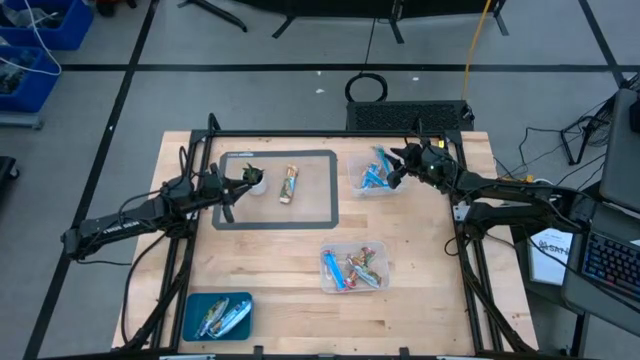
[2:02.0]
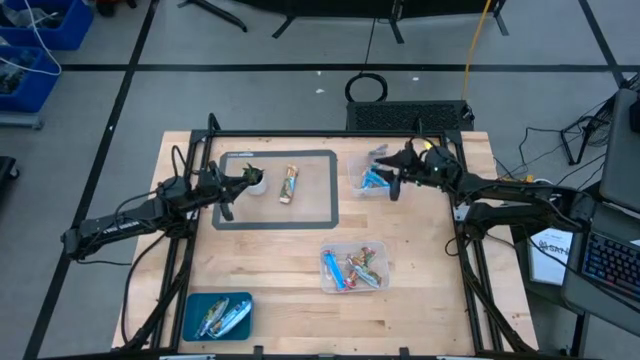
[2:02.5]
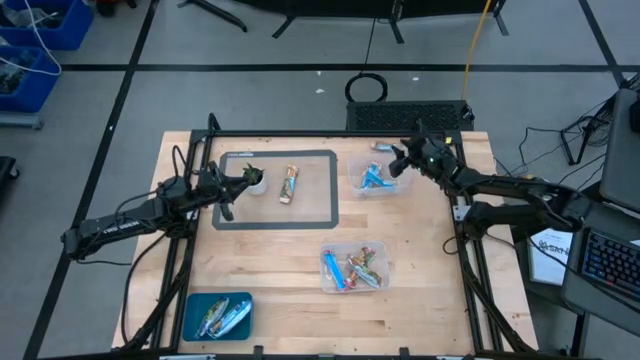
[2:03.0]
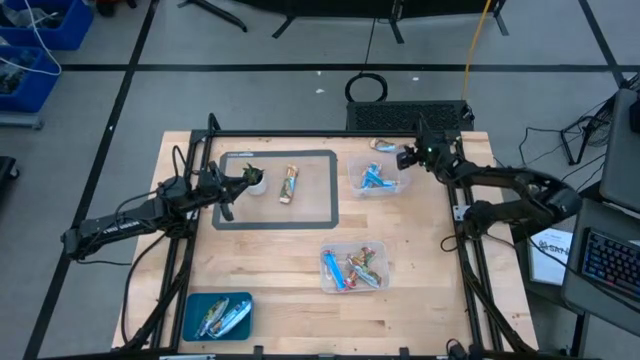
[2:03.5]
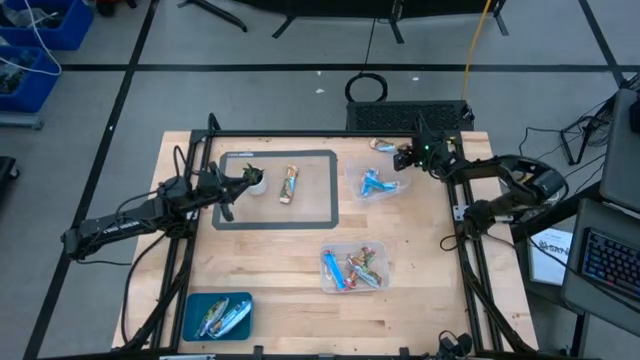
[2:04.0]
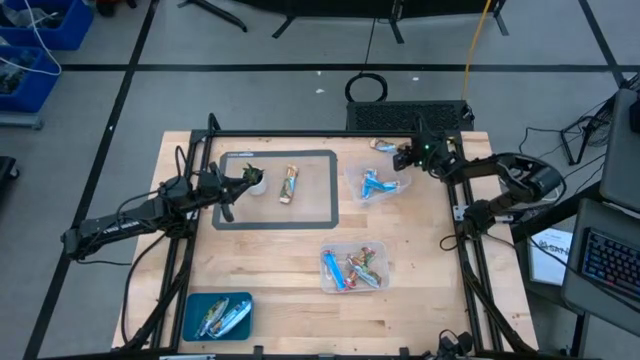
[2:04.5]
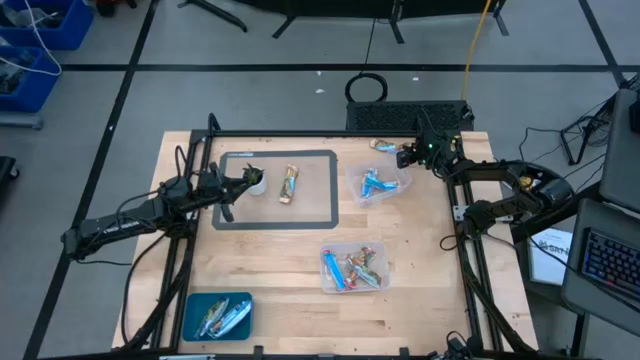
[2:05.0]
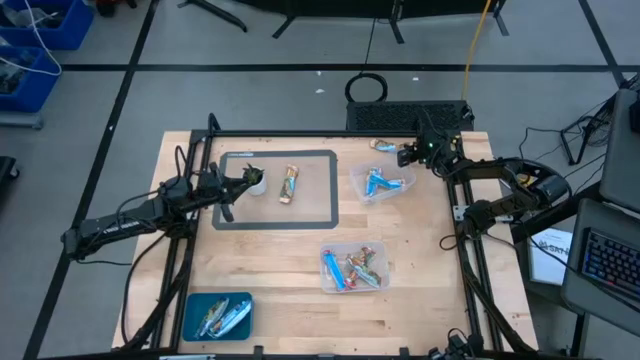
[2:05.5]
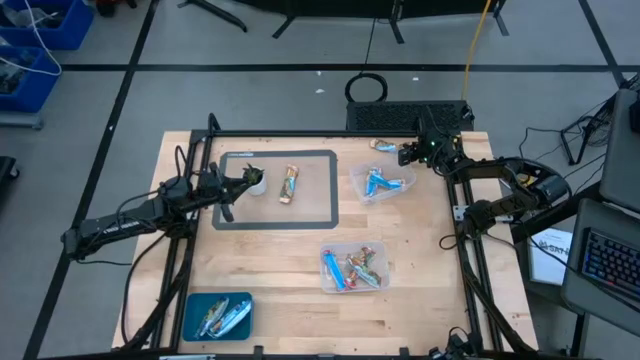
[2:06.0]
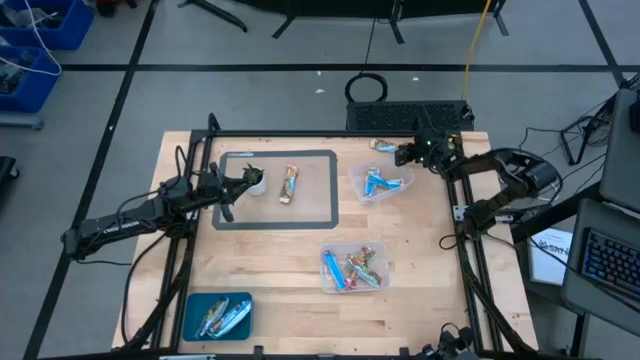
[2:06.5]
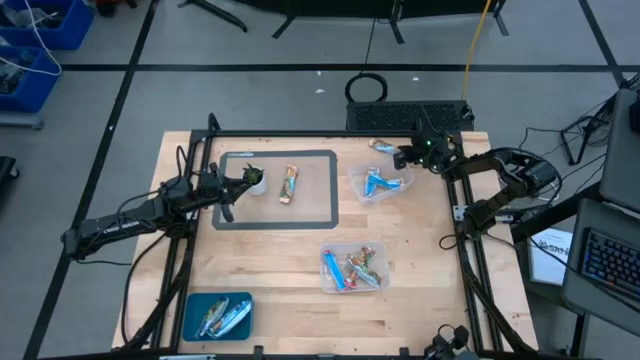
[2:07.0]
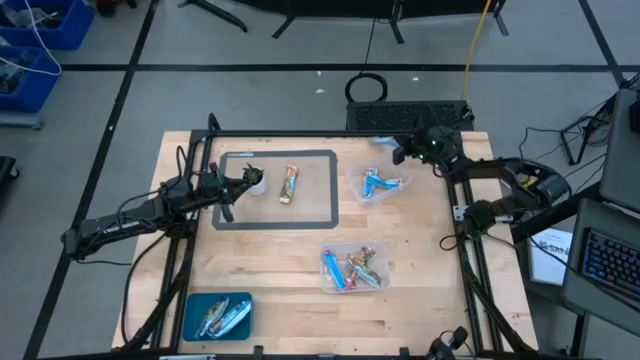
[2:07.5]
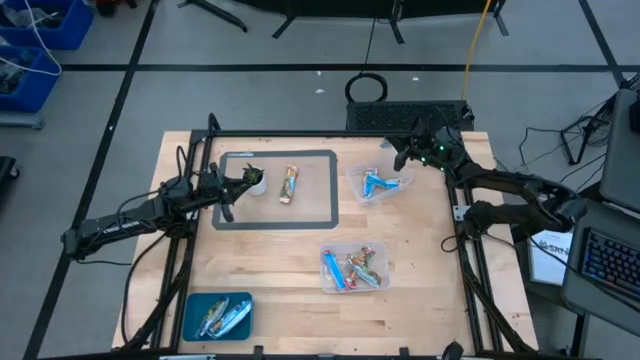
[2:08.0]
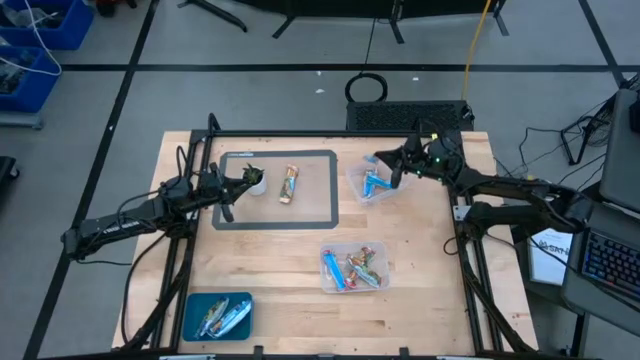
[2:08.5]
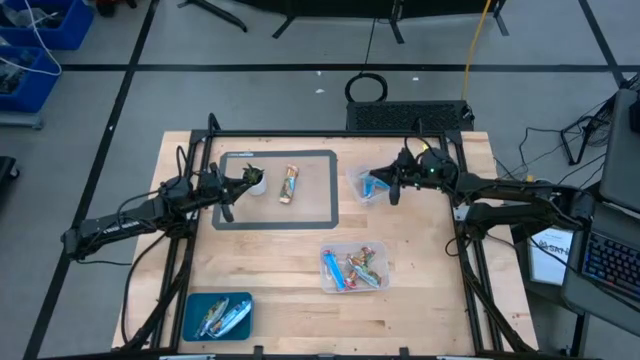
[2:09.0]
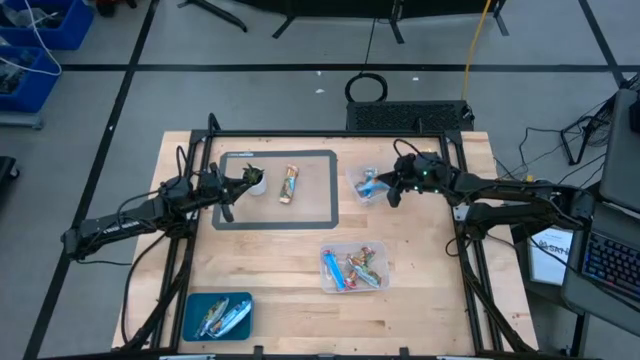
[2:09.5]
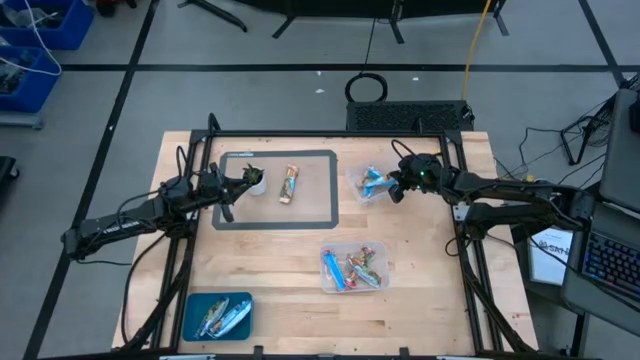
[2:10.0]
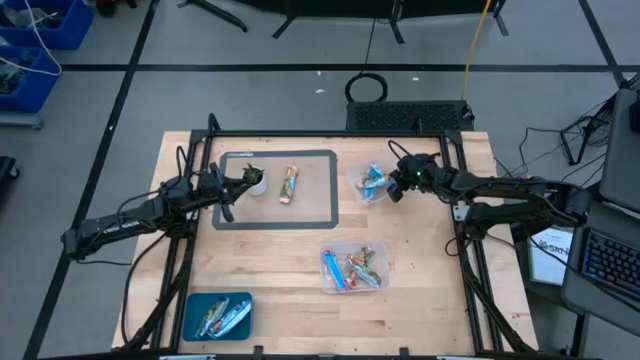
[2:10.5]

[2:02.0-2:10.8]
Task: Pick and place Granola Bars by type
Put the yellow granola bar into the top transparent bin

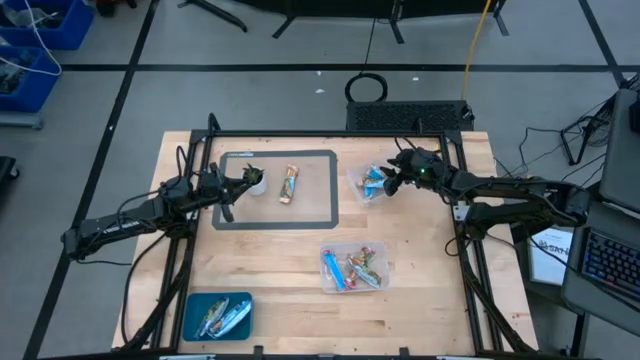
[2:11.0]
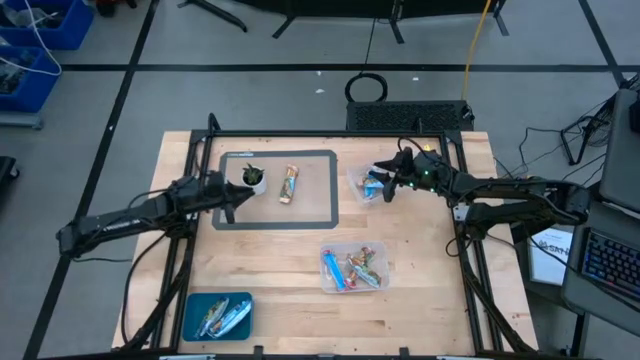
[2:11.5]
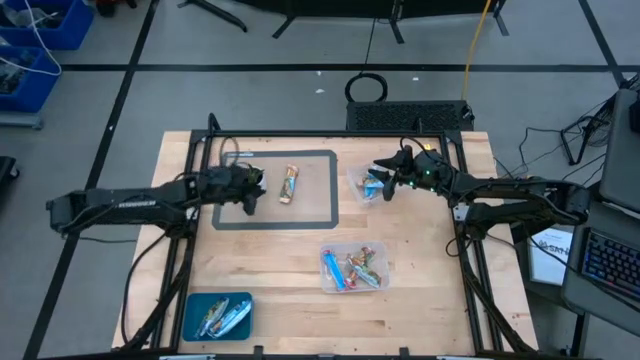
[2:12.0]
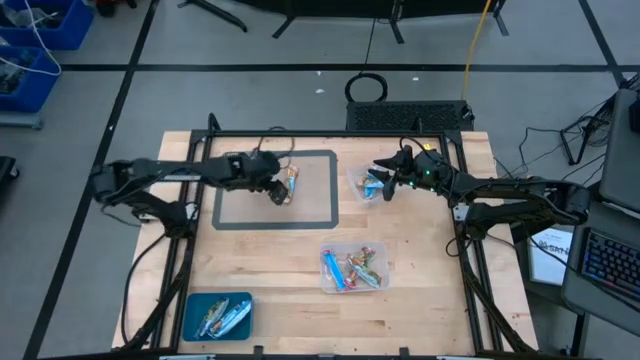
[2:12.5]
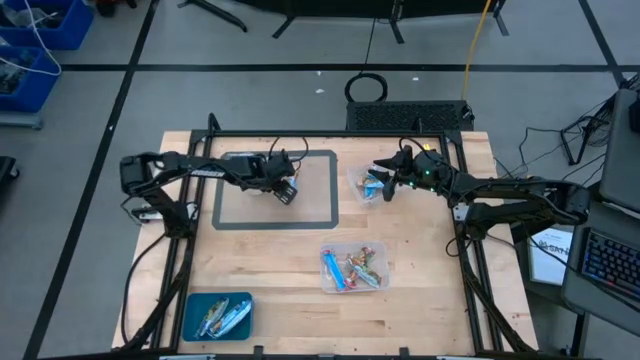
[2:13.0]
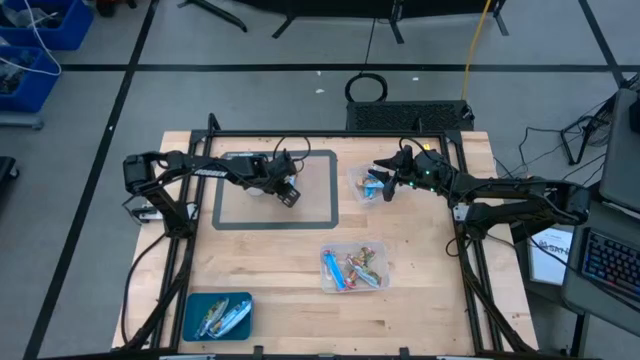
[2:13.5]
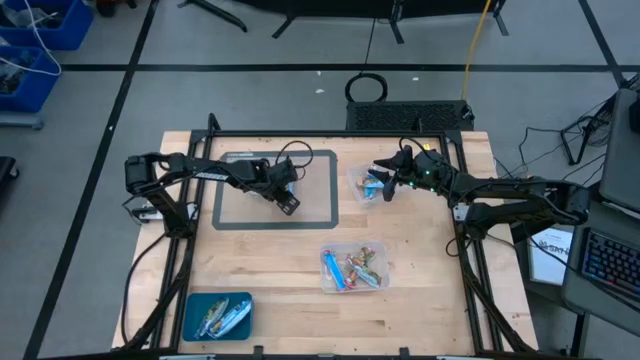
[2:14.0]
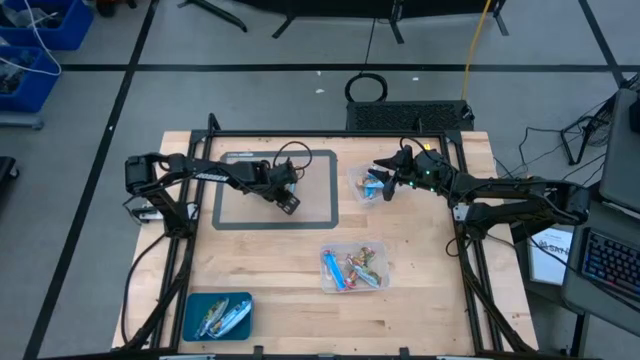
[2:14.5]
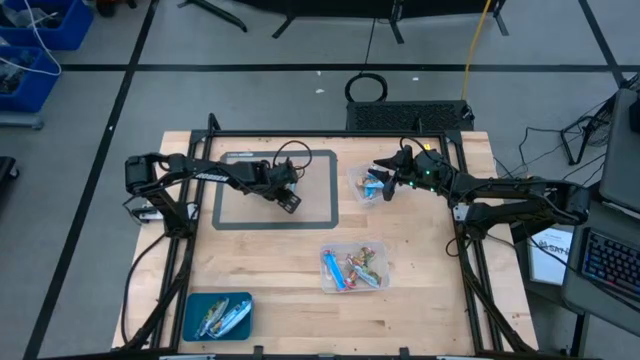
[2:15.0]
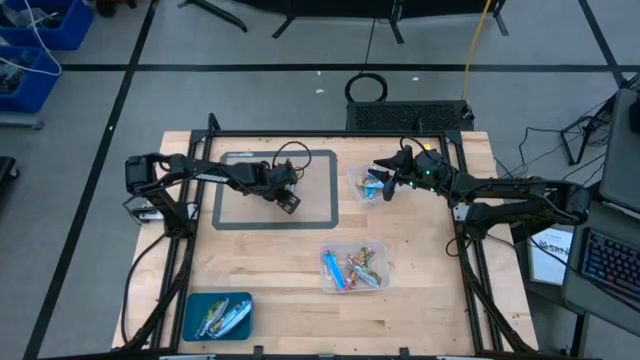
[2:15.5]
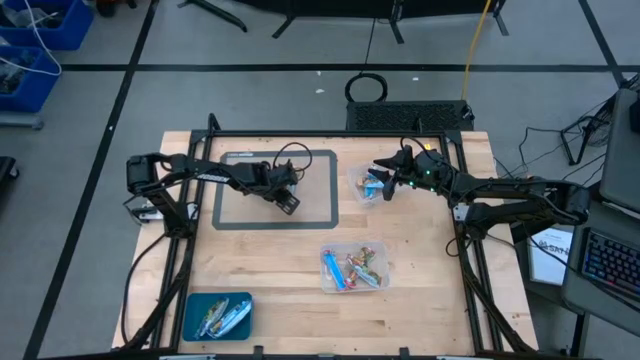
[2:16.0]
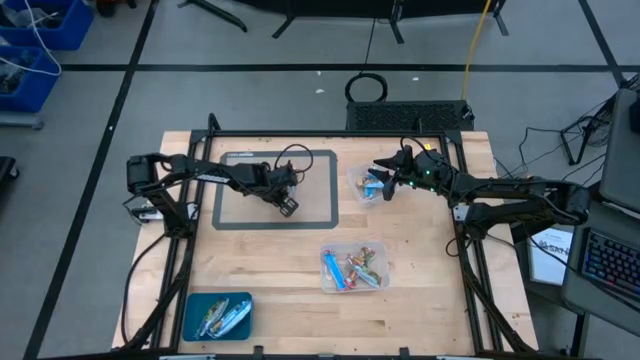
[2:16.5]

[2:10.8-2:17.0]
Put the yellow granola bar into the top transparent bin

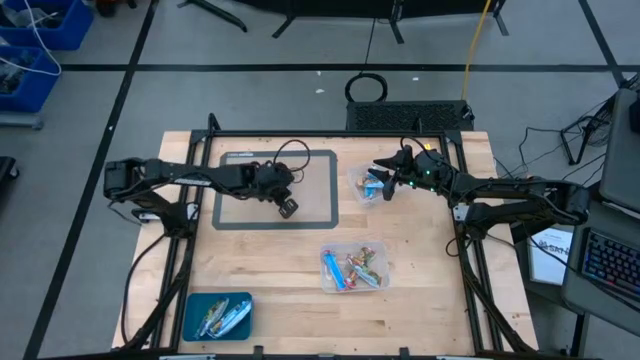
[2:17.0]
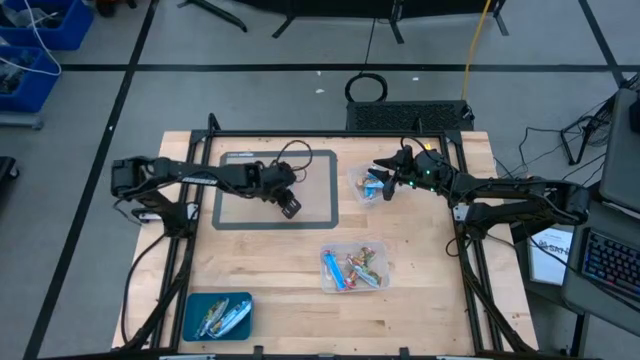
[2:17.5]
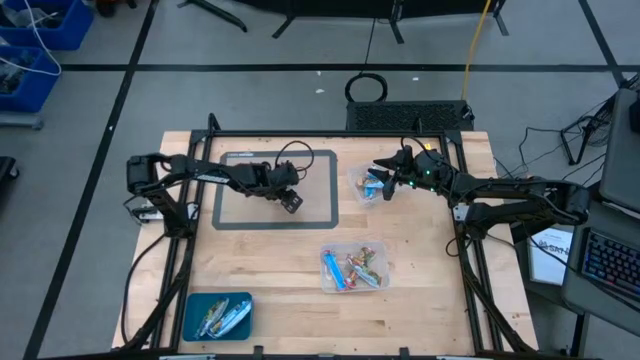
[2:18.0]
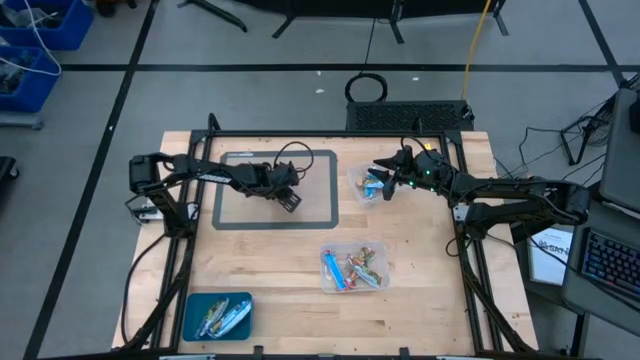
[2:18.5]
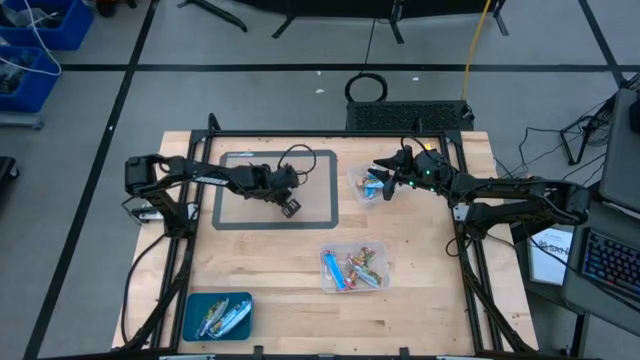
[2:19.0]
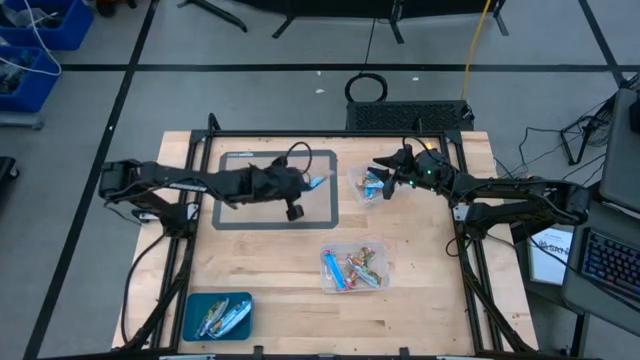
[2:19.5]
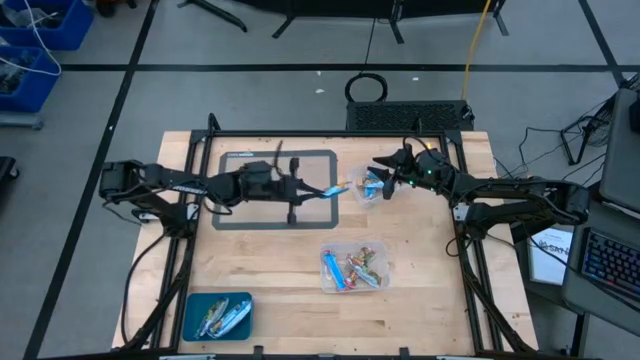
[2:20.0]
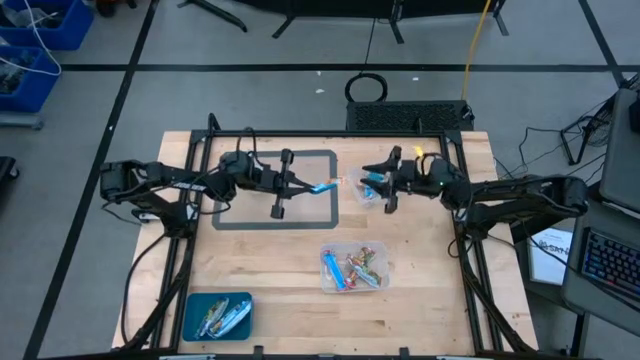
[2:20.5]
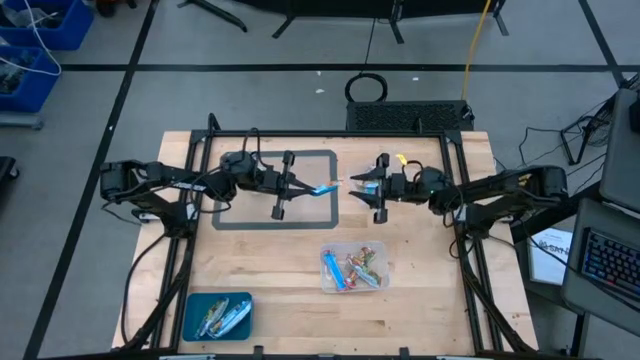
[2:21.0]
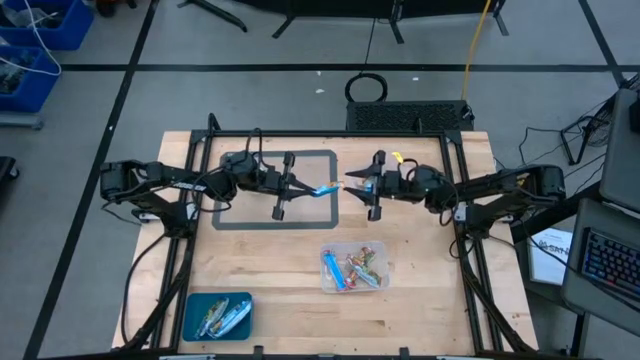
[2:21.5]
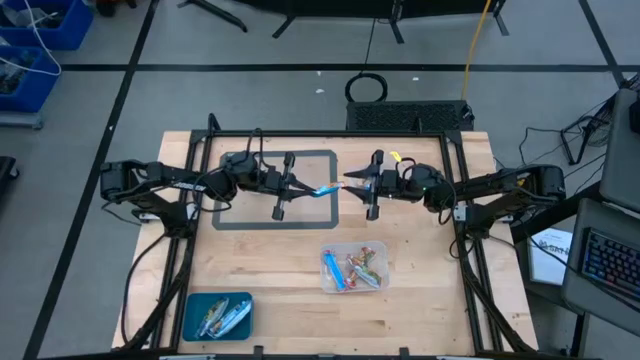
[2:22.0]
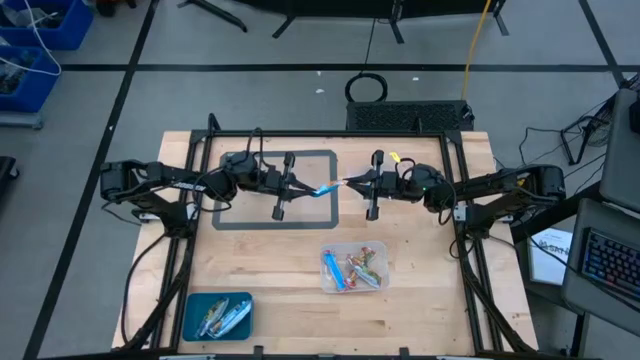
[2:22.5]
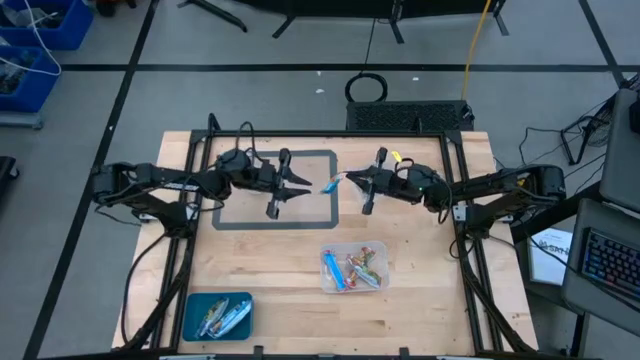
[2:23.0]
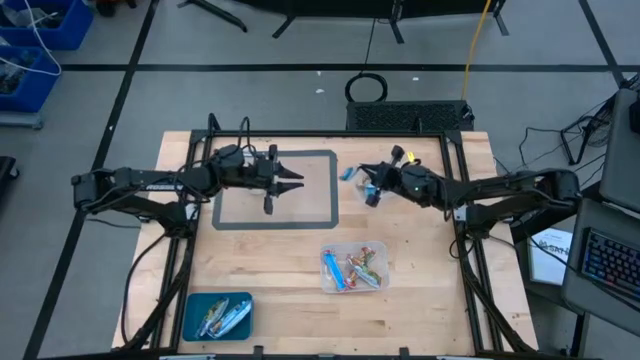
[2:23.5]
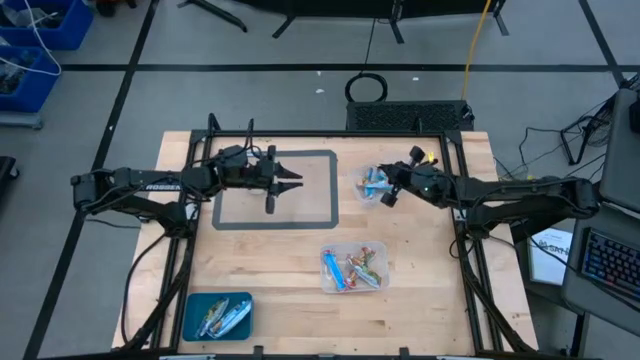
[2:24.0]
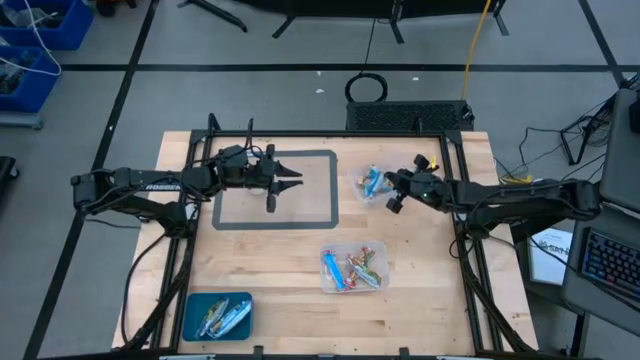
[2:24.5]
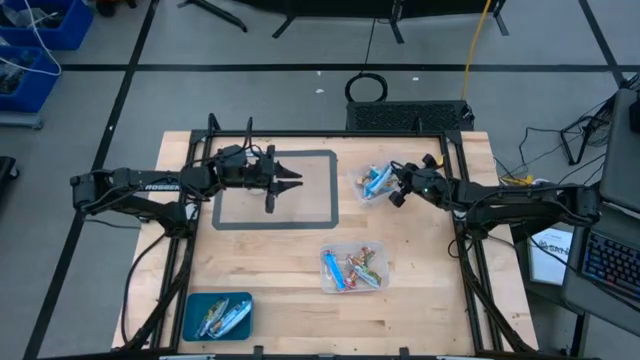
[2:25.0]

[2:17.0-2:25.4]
Put the yellow granola bar into the top transparent bin
